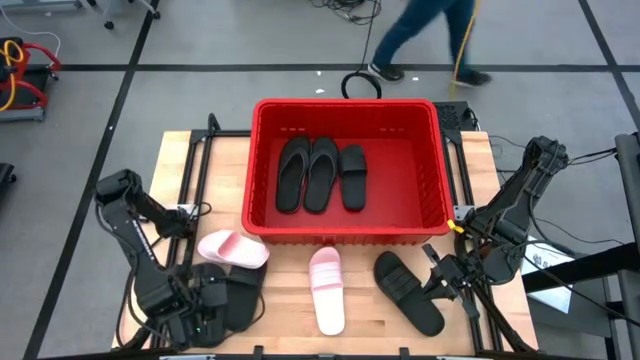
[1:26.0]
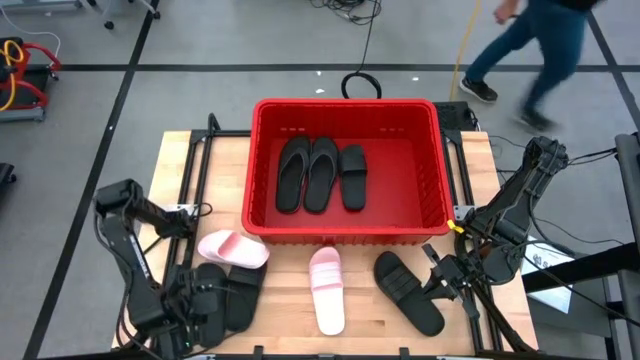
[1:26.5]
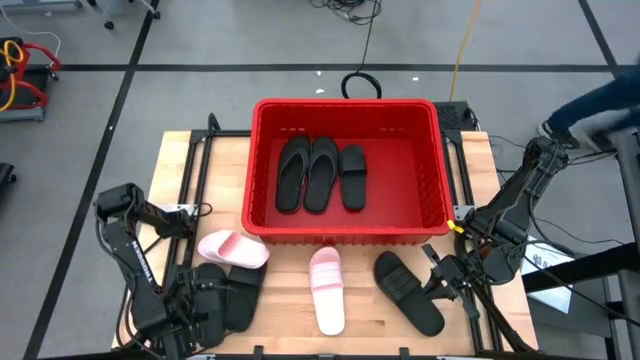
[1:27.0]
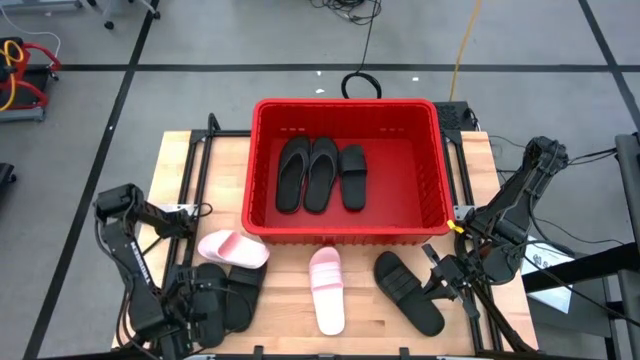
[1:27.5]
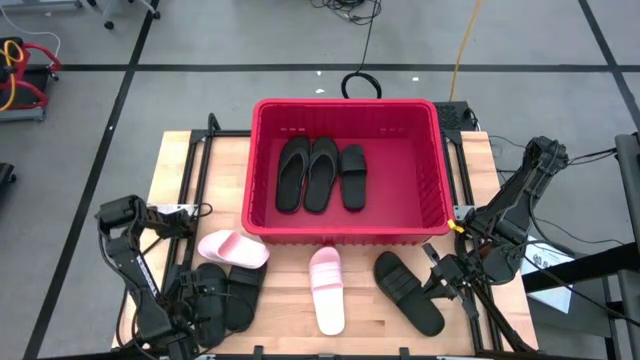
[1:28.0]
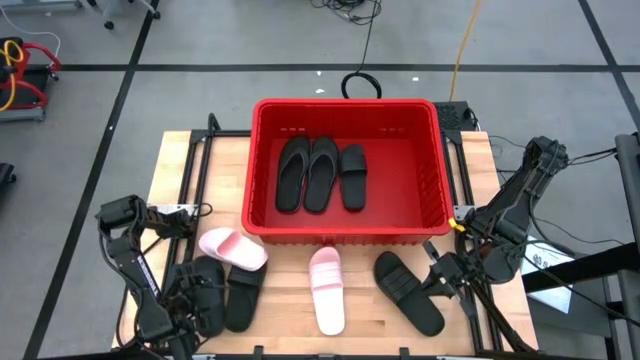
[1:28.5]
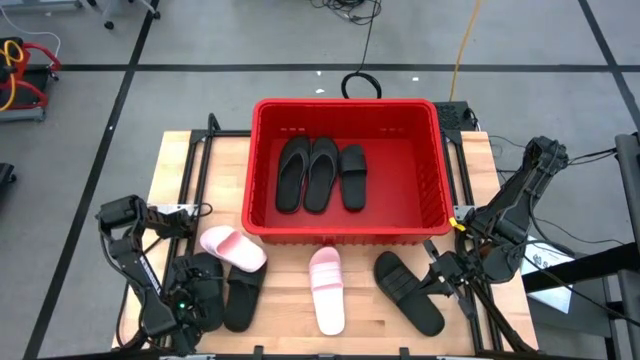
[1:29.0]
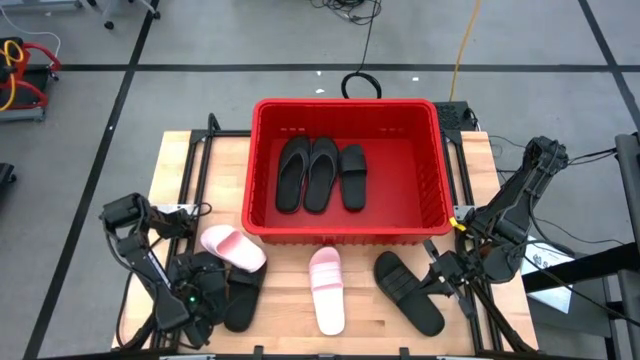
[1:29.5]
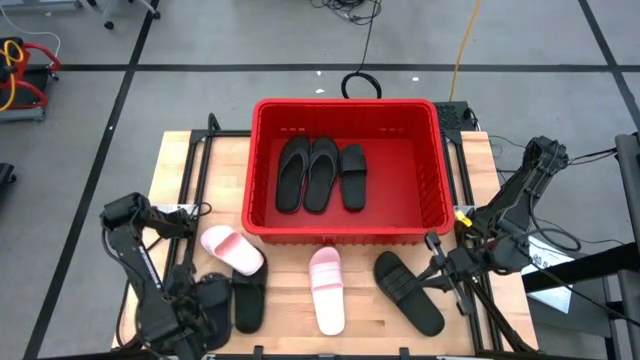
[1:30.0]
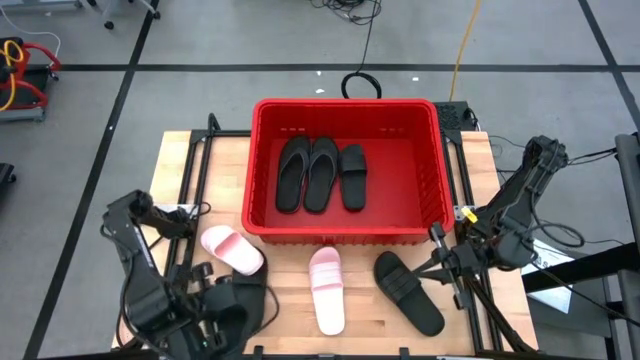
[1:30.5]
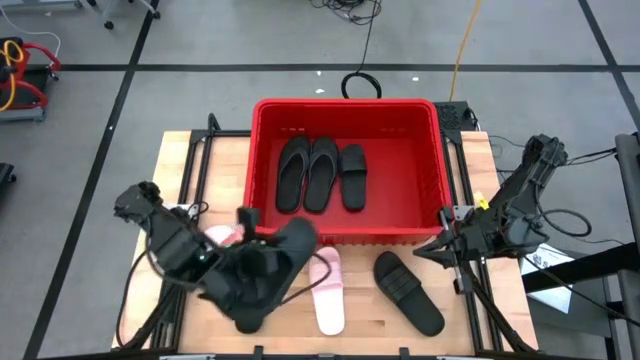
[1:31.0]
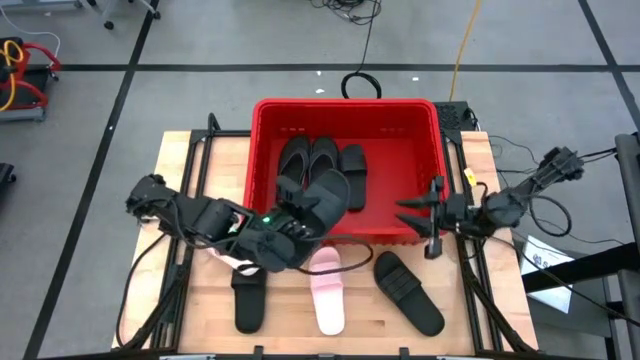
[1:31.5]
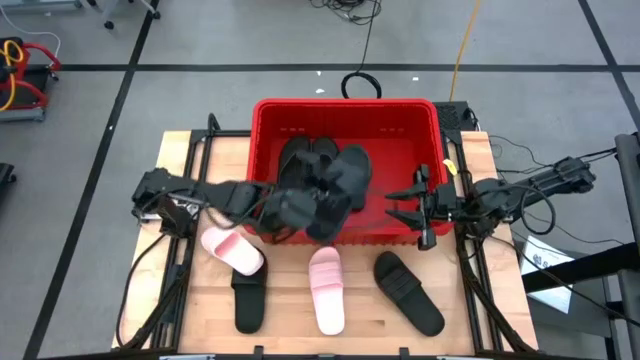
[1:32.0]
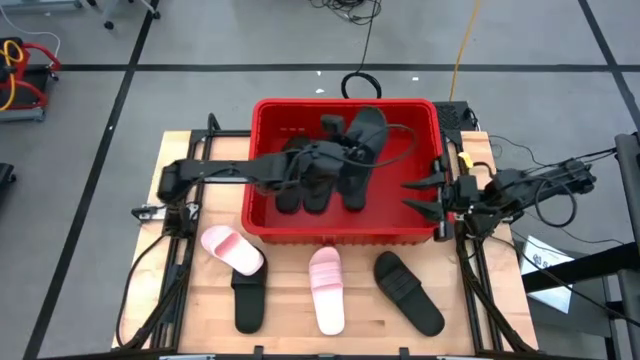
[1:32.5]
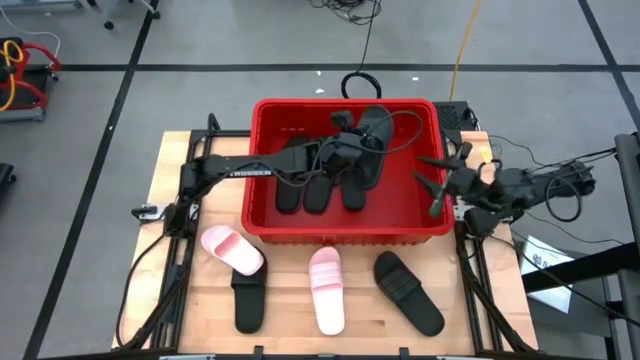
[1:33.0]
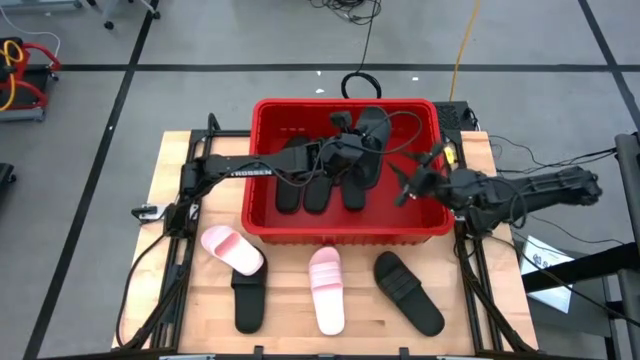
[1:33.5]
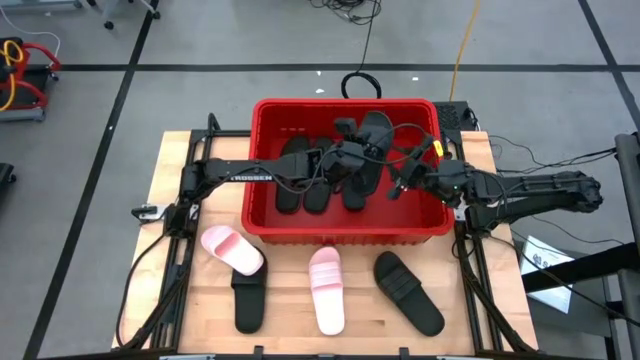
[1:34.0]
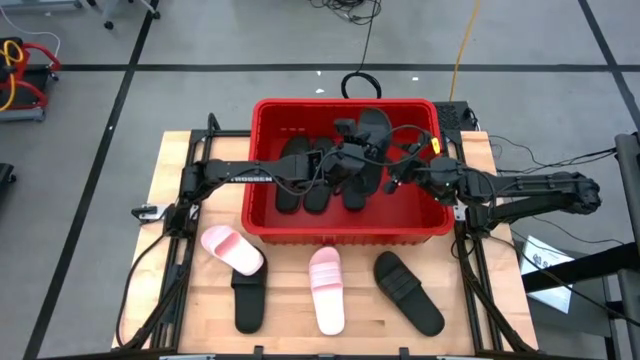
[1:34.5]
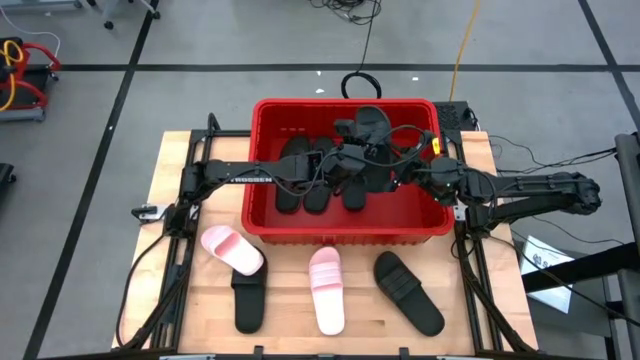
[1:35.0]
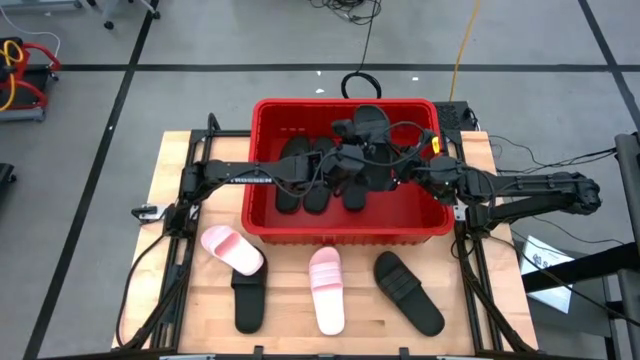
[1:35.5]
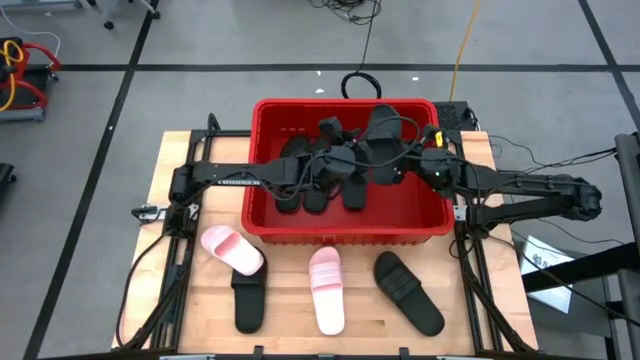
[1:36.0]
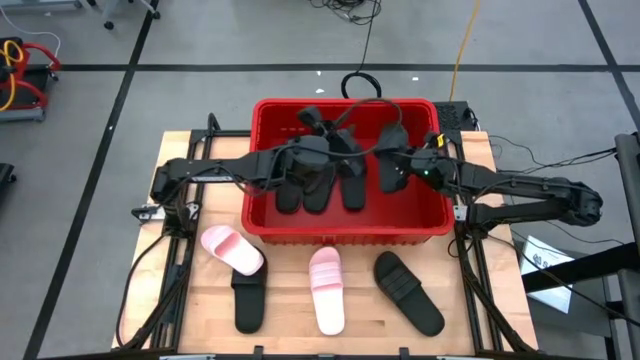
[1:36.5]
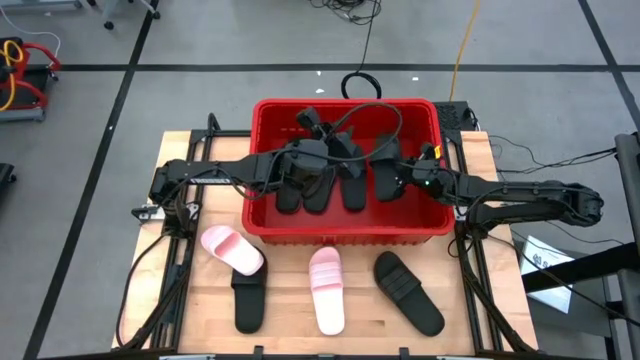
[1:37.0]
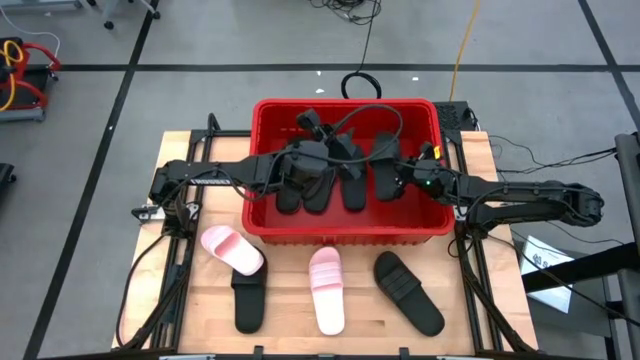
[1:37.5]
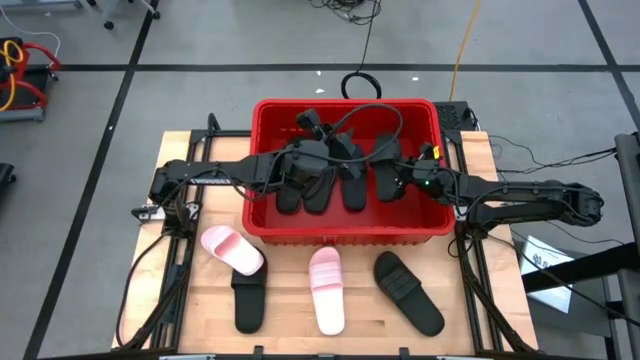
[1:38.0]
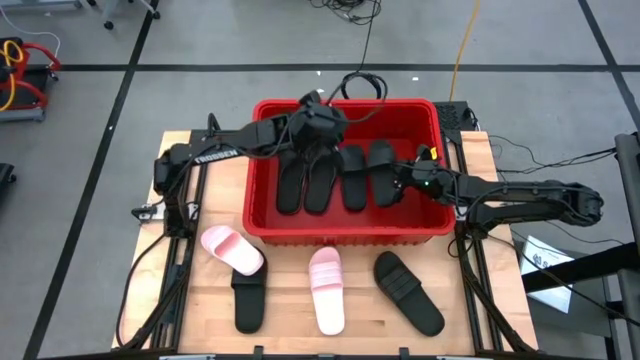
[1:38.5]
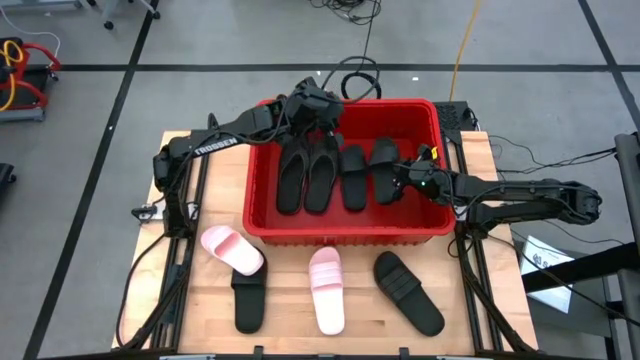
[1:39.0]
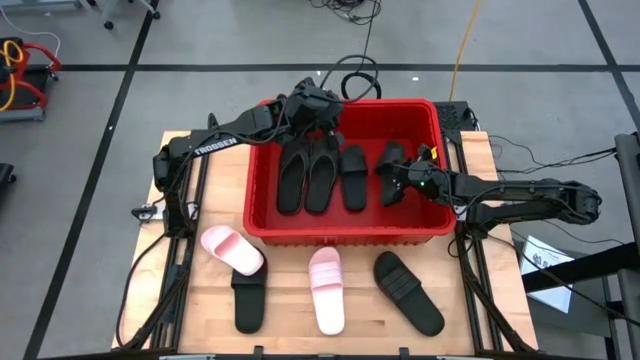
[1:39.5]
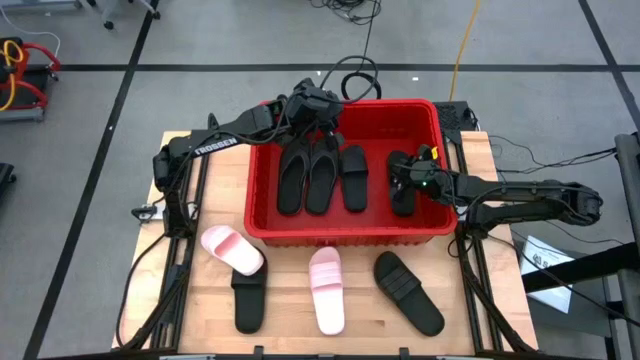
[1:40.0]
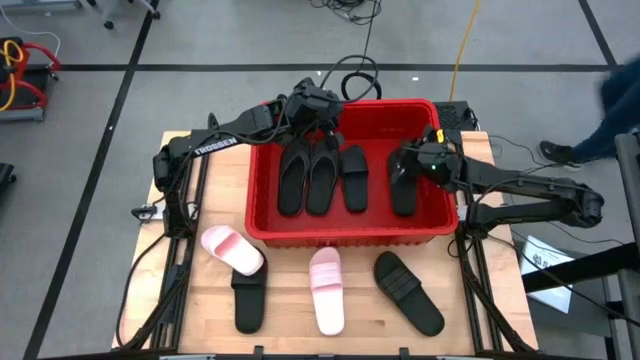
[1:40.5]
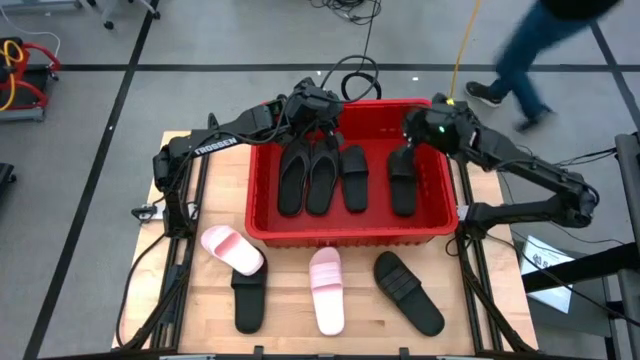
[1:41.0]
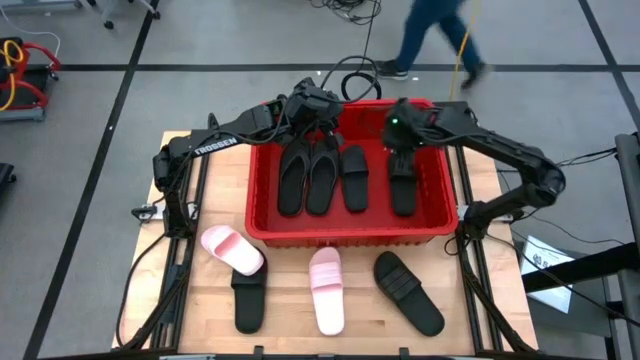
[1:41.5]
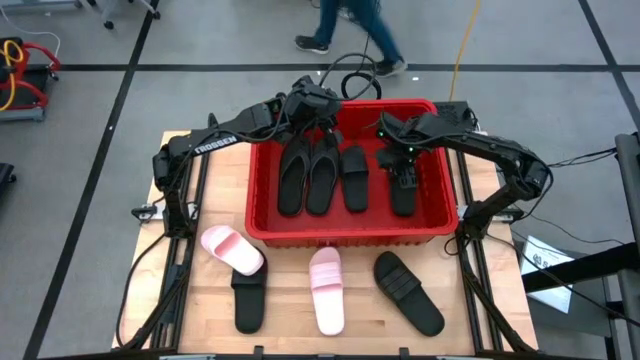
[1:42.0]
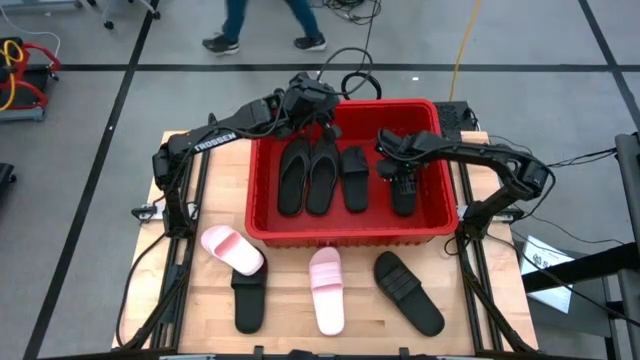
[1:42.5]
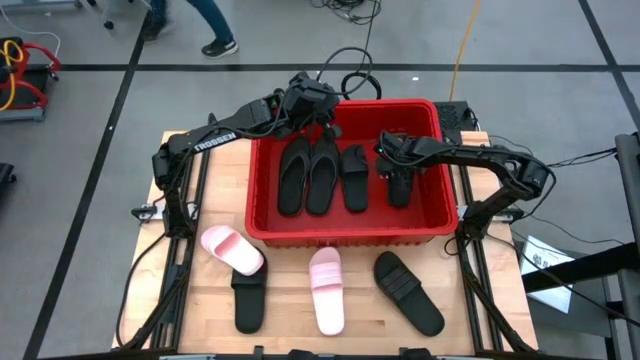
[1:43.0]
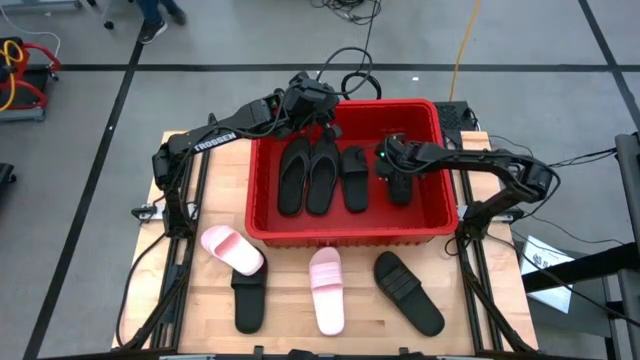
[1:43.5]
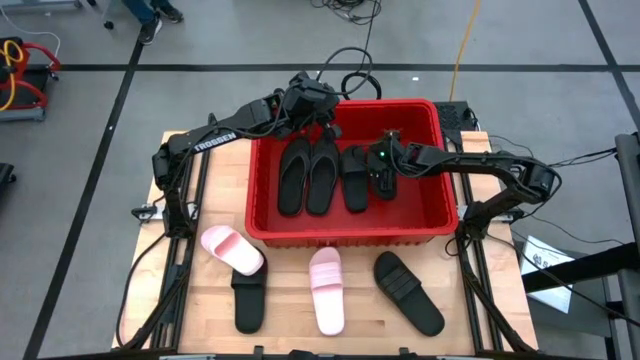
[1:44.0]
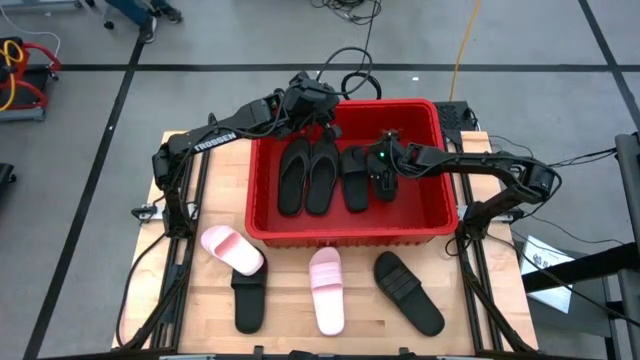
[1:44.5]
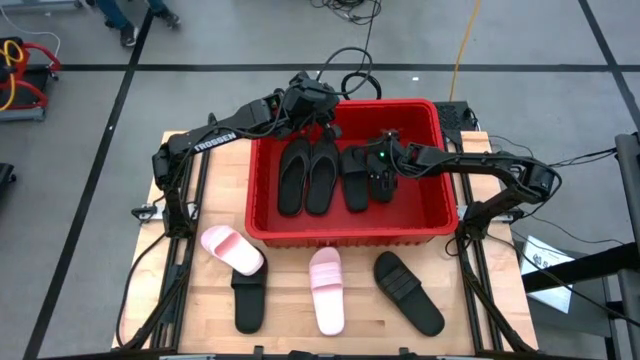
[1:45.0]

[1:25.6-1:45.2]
Task: Pick and place slides into bin
Put the black slide into the red bin

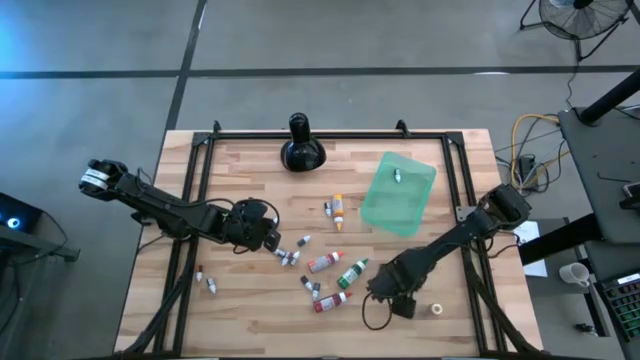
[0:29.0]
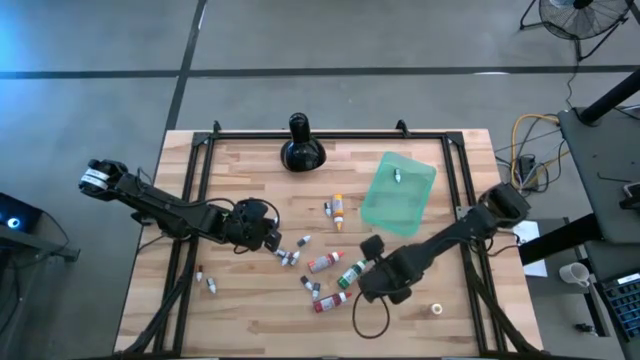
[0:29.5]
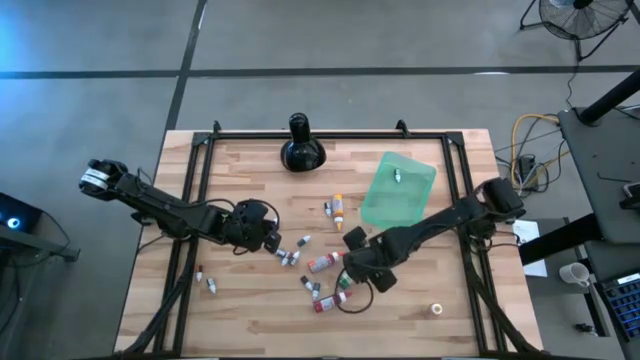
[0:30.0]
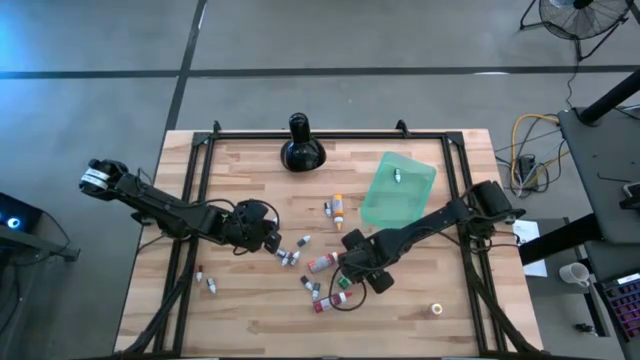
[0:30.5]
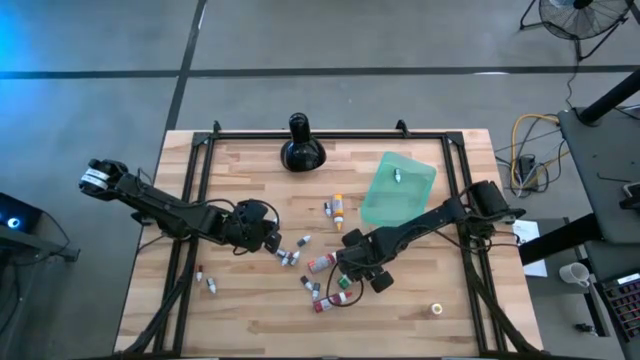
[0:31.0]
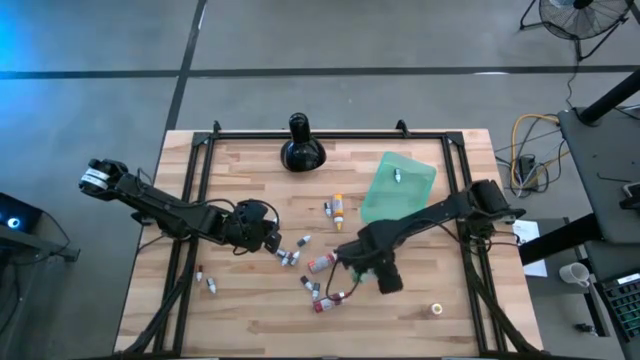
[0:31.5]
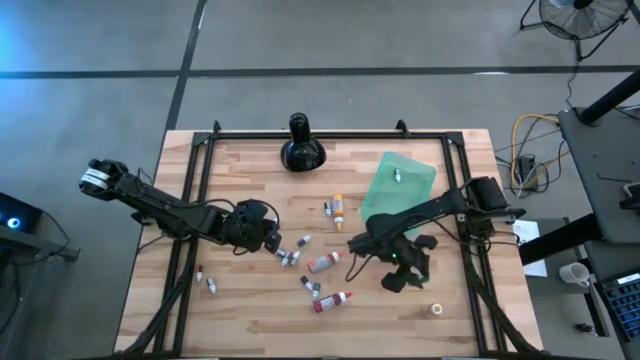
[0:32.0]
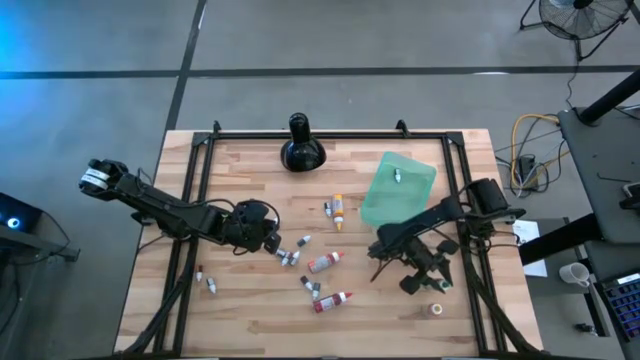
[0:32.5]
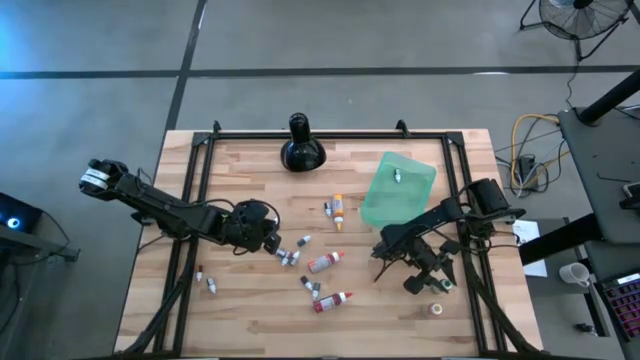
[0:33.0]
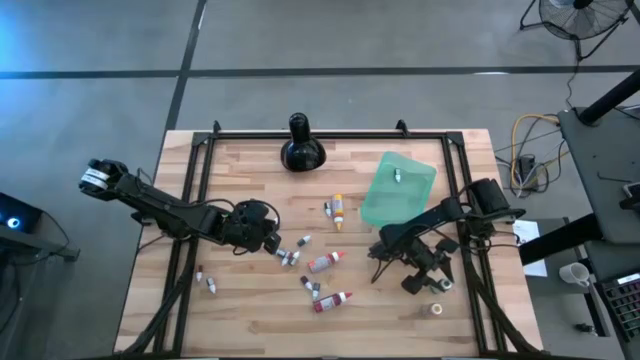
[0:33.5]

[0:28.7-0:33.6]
Task: Pick & Place food coloring
Adjust the large green food coloring bottle in the table
